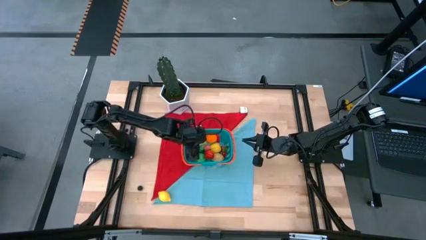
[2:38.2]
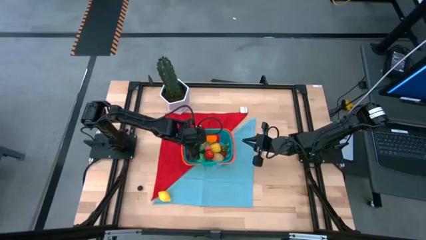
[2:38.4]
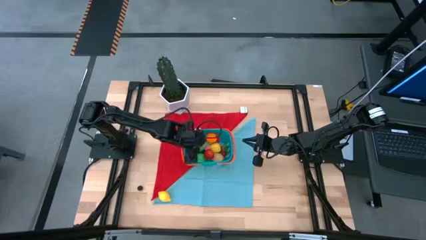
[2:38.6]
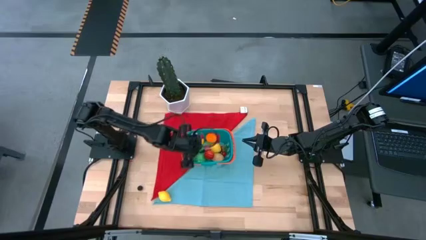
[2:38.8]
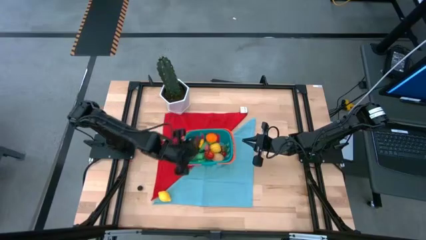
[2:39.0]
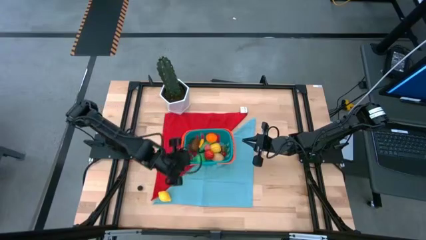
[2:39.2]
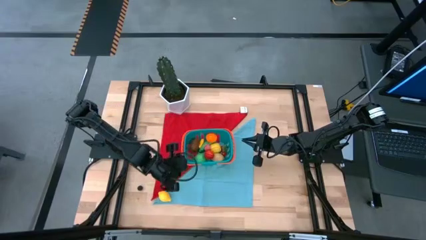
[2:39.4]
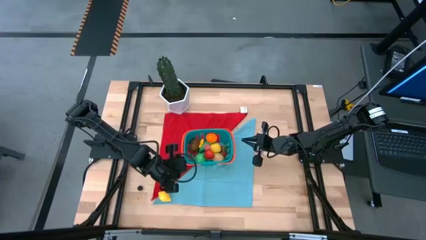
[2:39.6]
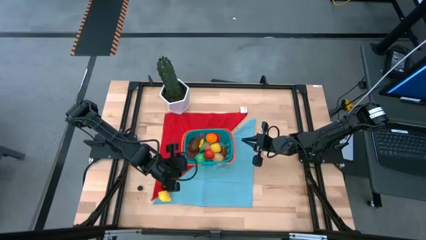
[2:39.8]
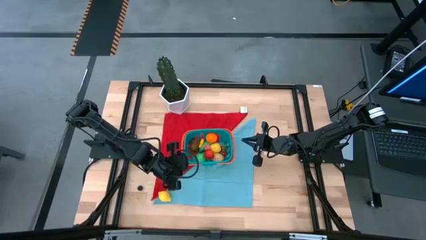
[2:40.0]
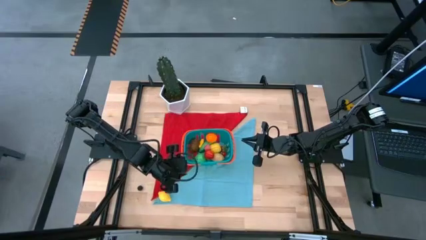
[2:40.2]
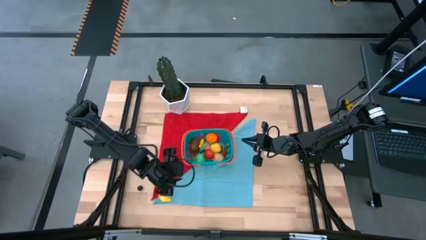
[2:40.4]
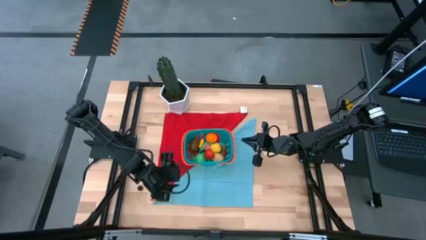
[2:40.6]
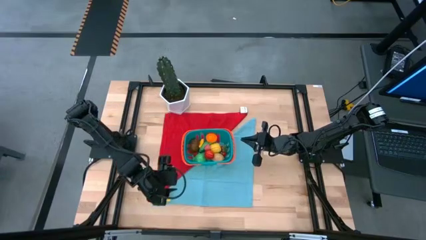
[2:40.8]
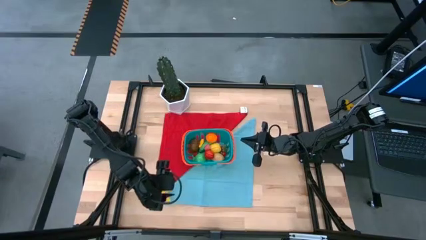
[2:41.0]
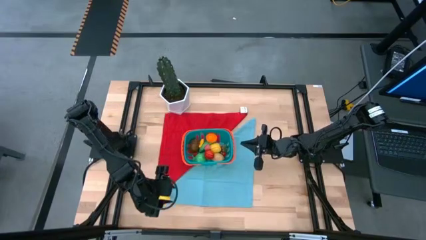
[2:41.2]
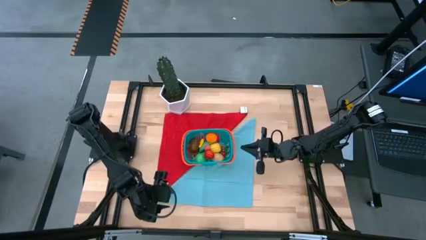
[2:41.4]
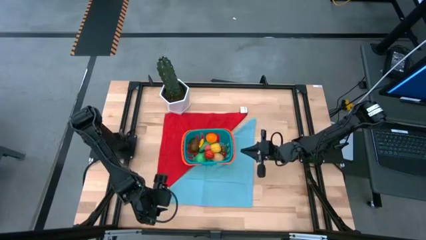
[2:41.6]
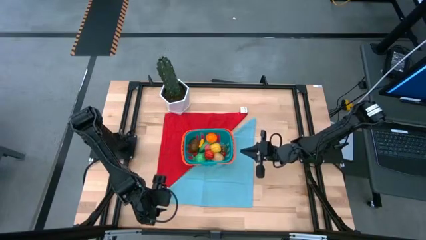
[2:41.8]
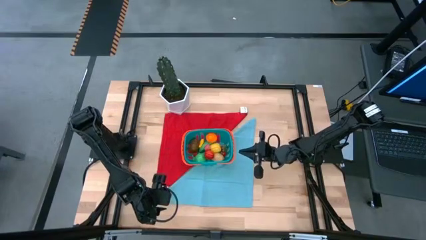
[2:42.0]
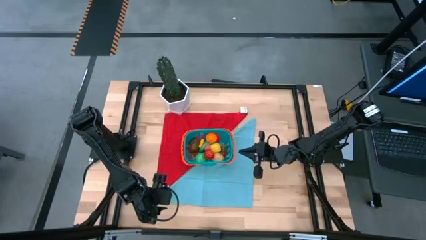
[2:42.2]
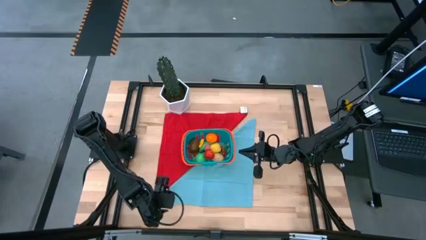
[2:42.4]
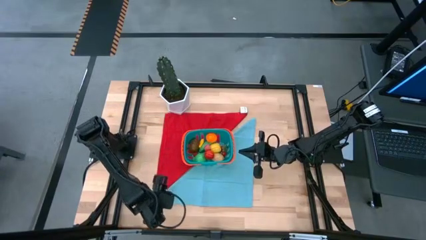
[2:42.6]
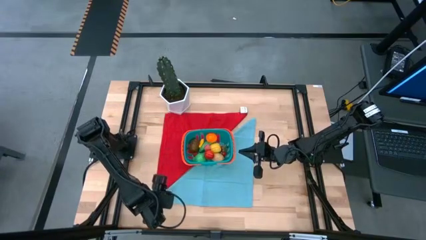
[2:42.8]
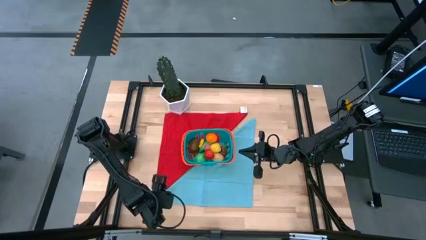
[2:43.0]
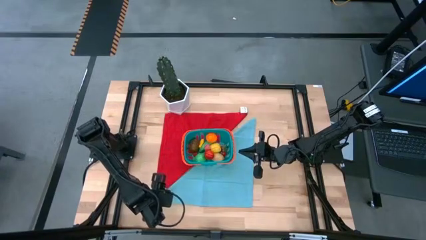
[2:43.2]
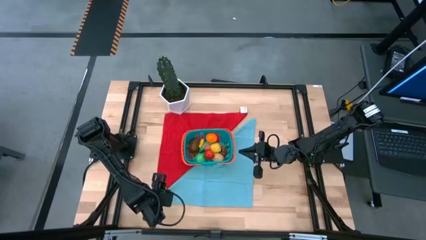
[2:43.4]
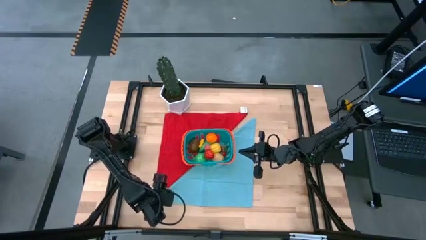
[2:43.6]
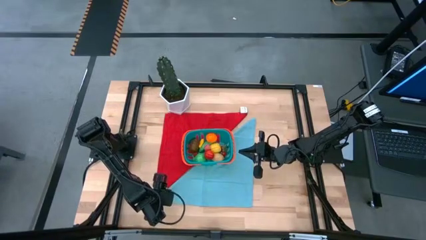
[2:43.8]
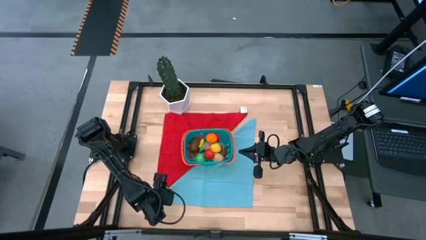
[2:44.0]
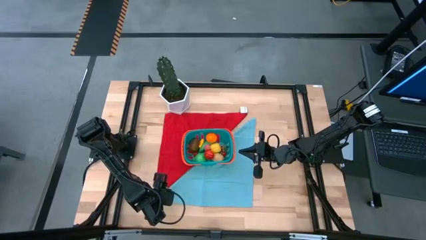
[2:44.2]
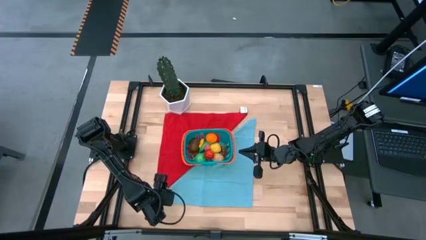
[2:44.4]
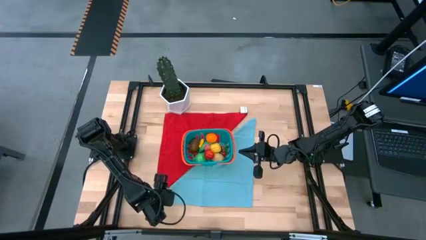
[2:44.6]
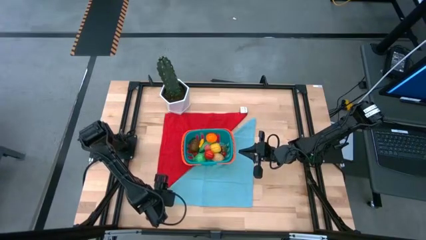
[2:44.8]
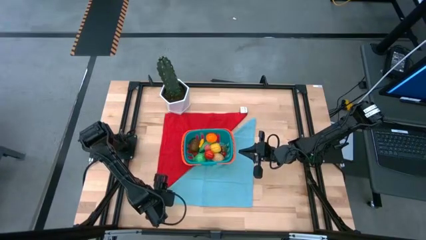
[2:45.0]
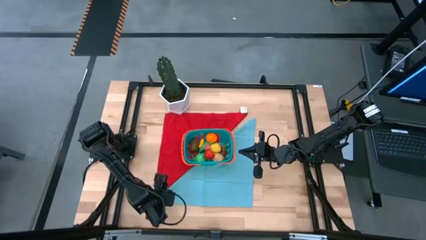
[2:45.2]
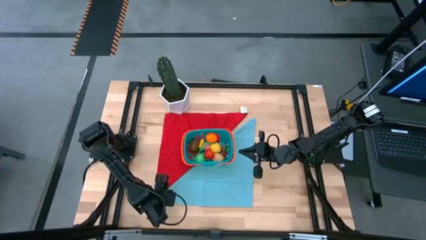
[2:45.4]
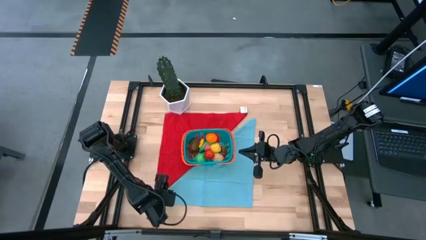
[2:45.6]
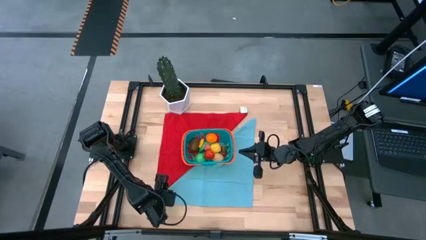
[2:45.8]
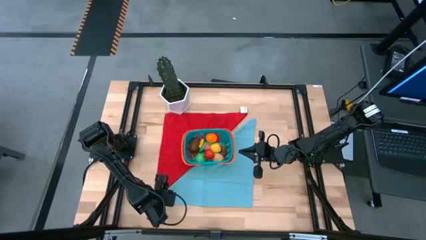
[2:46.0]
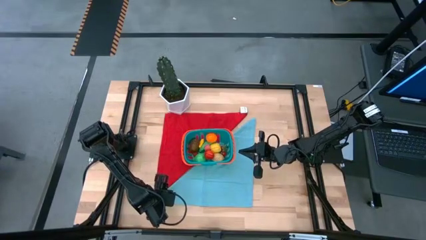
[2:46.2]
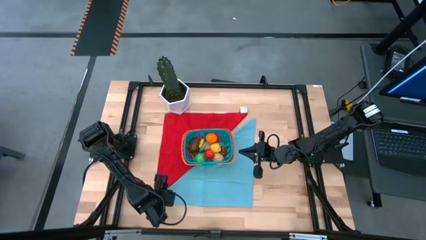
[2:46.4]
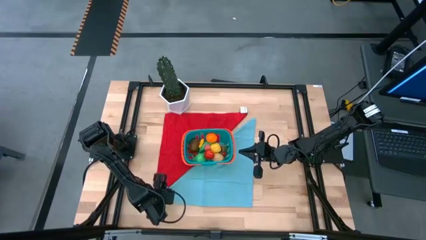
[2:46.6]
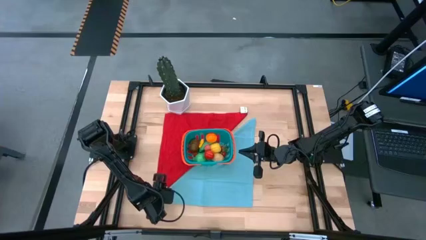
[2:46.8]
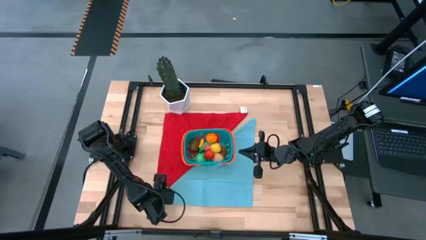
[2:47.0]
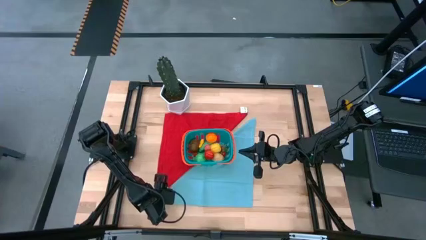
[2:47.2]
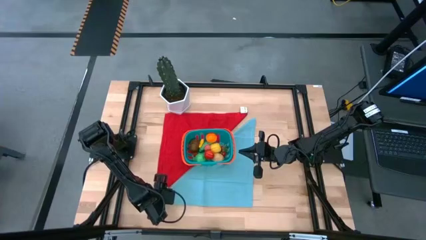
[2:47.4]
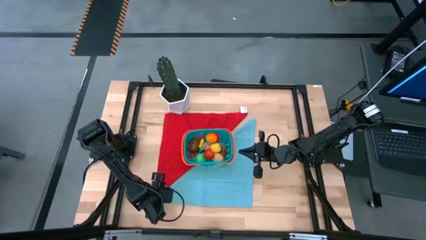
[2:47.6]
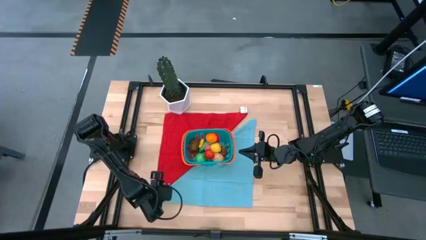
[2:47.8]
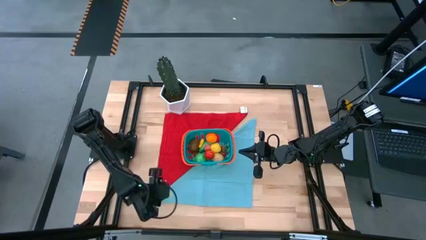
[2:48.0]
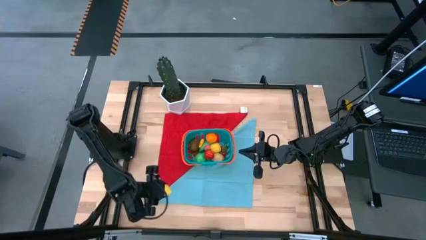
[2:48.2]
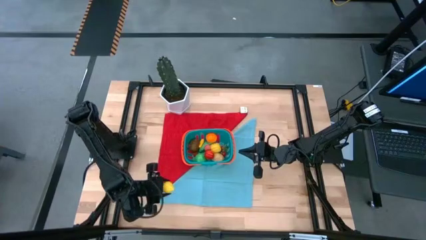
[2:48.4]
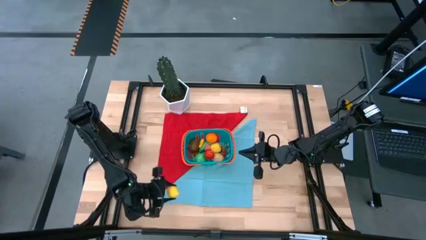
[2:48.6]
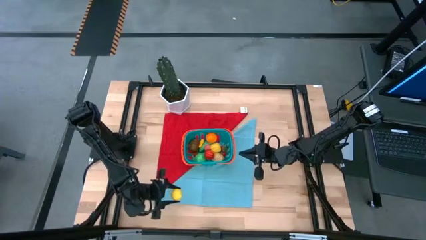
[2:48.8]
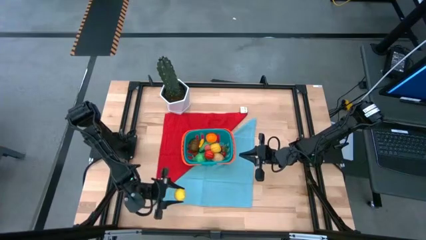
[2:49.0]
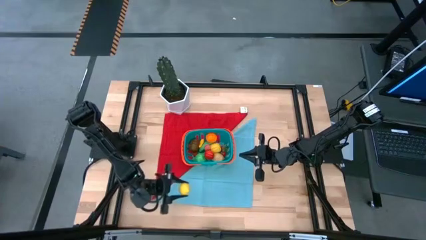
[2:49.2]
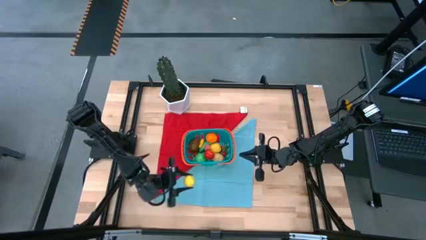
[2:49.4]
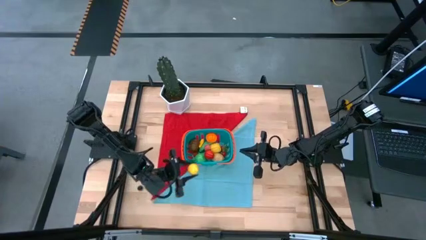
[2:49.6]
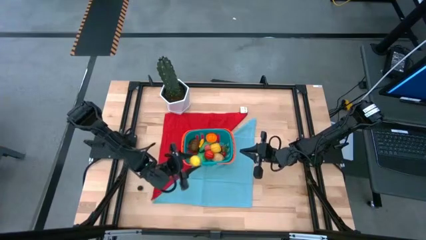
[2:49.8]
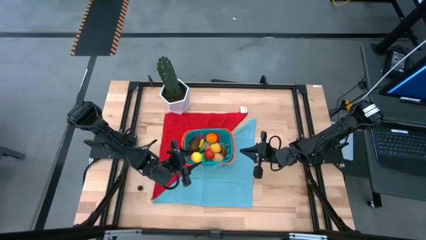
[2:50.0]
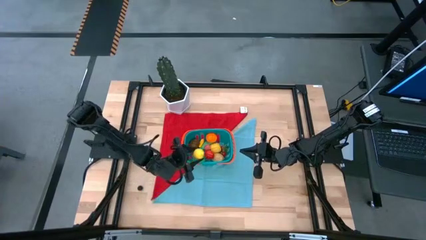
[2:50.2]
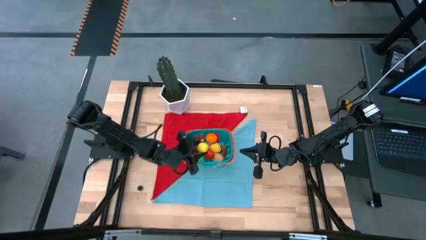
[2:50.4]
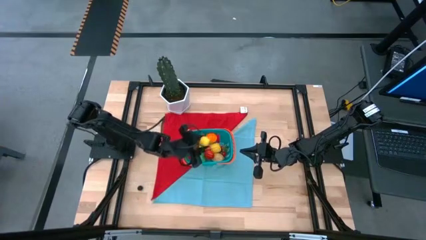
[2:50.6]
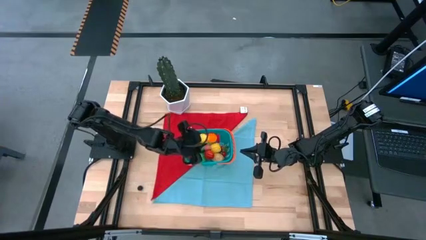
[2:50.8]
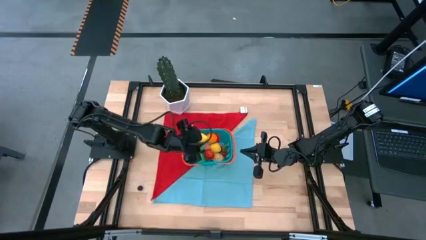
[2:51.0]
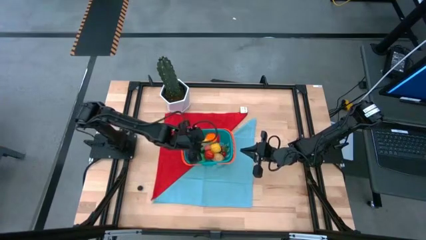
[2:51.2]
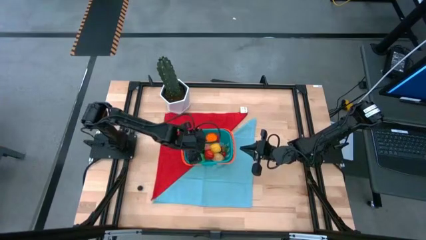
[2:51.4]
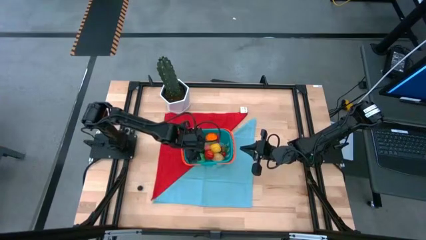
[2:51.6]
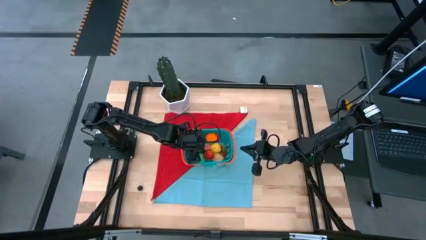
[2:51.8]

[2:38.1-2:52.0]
Task: Build produce basket
Put the yellow lemon into the blue basket
